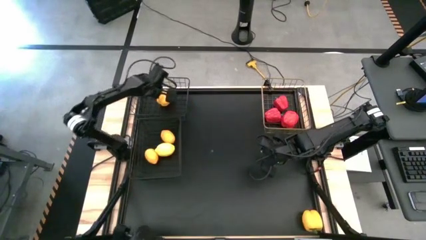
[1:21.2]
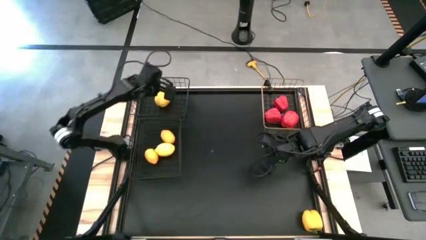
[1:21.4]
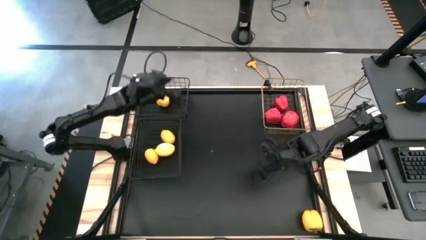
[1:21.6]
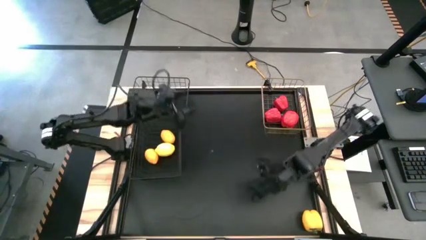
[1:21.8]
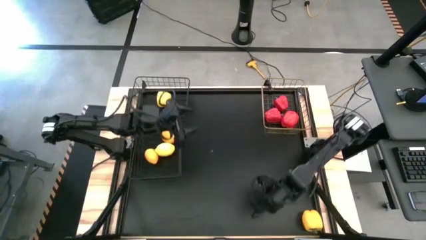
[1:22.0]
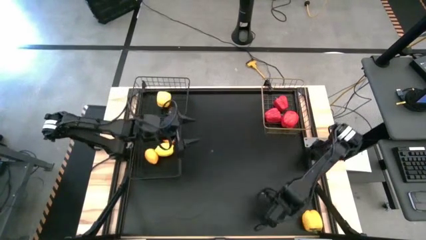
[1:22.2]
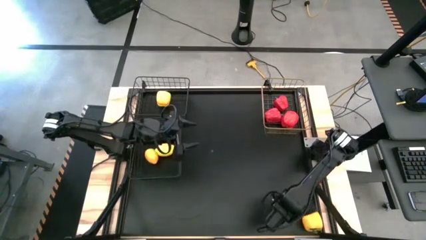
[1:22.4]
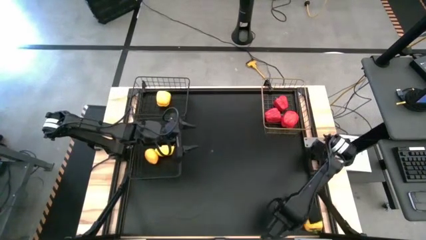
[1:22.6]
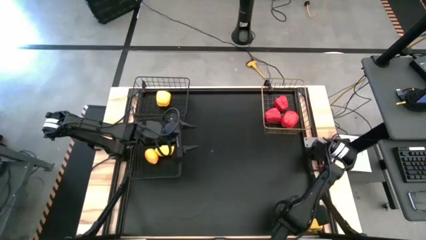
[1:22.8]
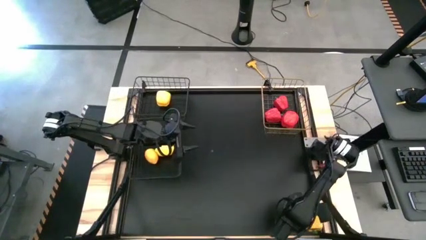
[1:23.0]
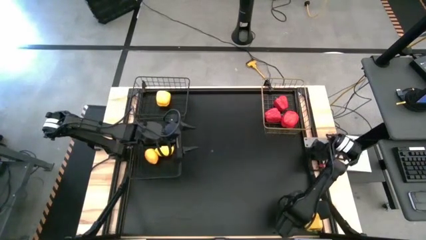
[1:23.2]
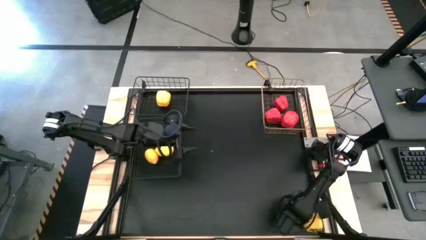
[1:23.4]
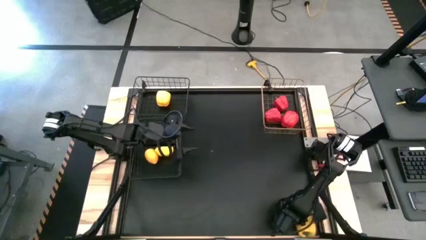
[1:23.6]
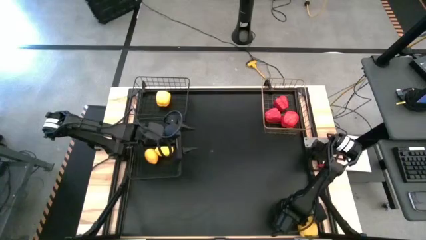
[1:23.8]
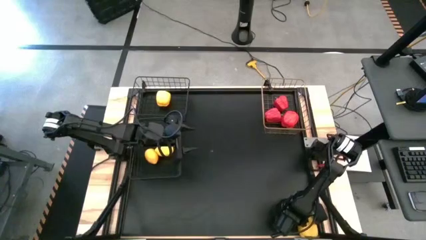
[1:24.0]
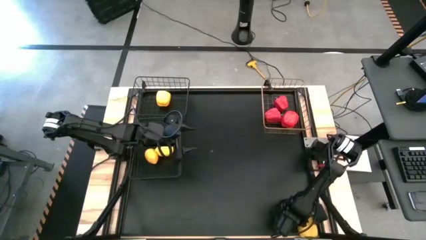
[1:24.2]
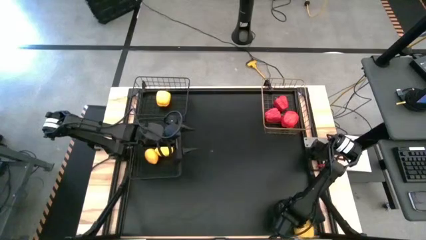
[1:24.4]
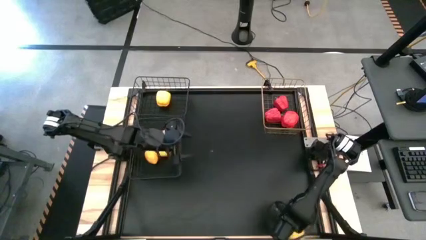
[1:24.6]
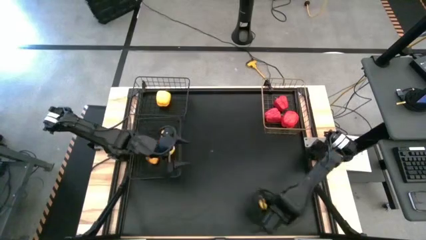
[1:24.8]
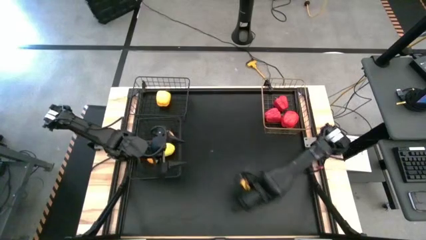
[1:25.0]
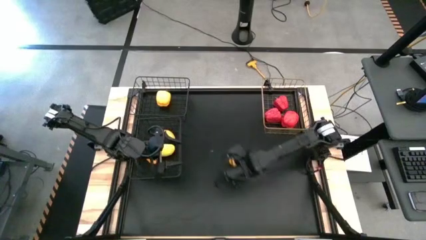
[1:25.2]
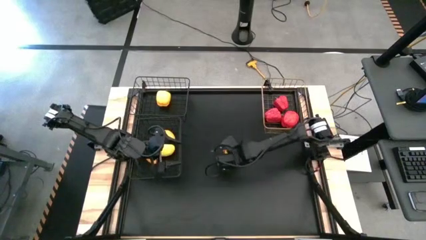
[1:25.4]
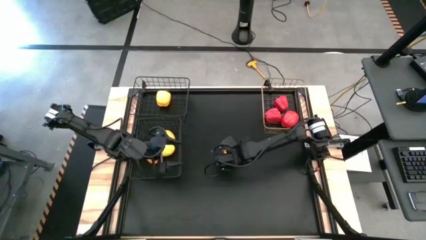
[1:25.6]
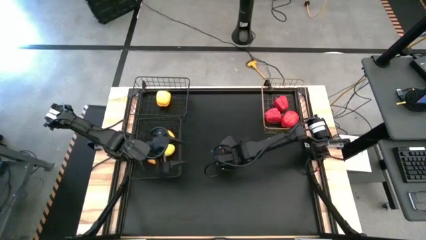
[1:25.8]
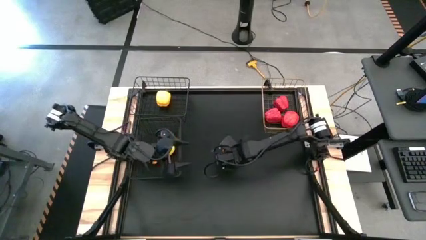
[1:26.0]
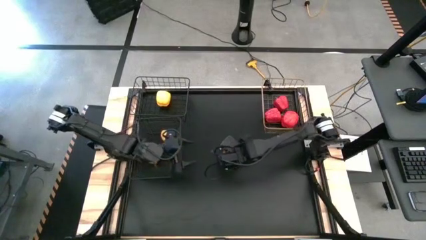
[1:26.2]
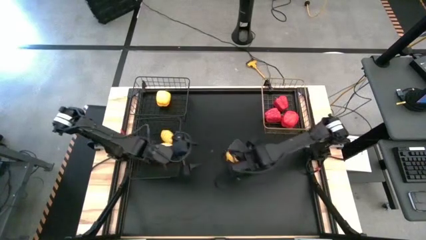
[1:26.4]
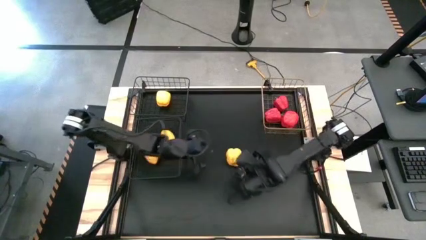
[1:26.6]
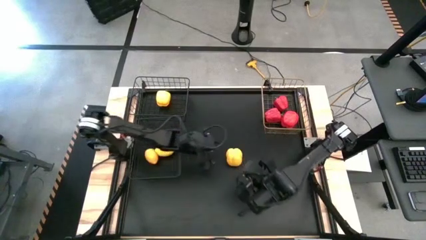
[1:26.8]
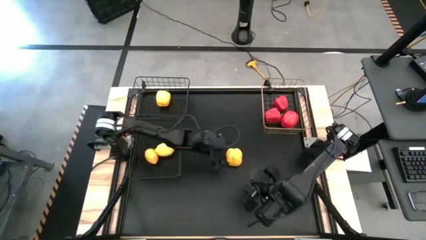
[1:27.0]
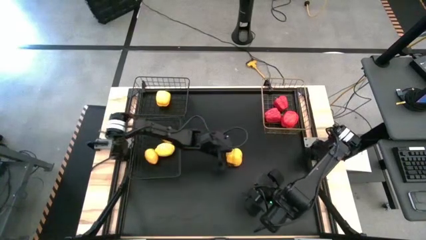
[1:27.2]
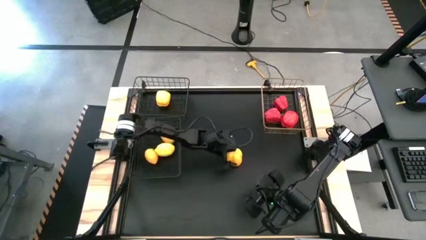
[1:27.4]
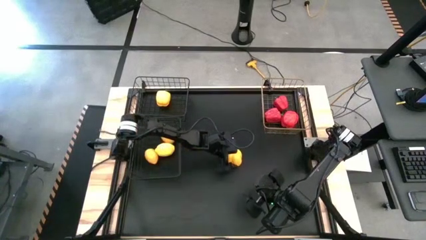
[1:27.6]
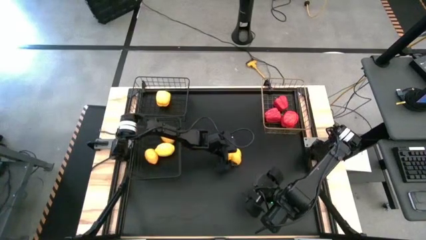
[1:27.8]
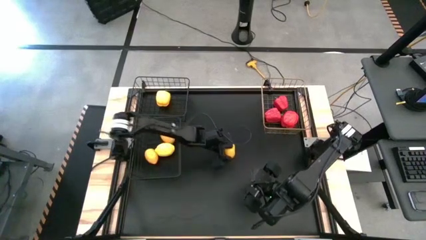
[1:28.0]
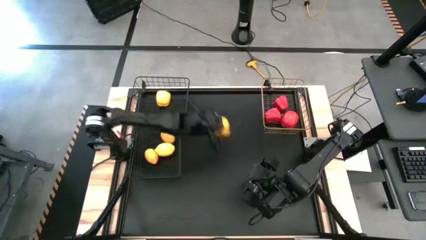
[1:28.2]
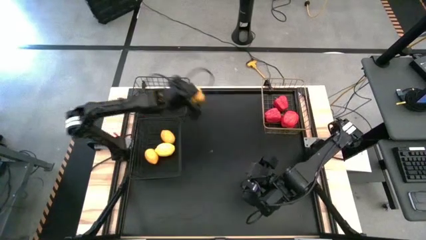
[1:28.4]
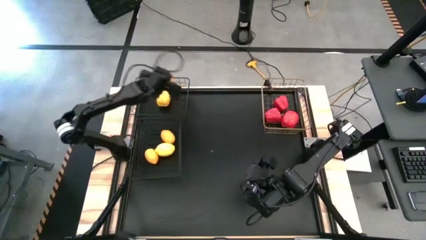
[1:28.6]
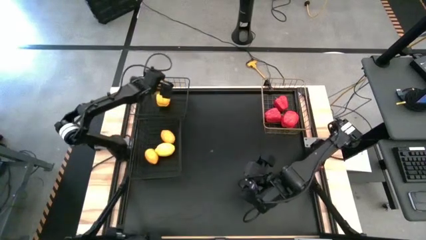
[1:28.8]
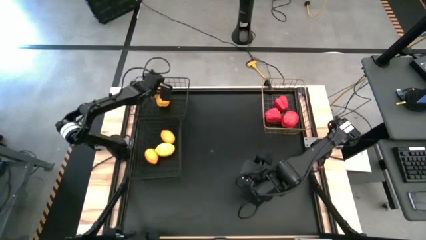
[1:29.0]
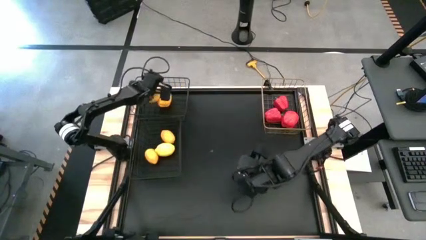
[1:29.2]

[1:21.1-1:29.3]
Task: Sort produce into baskets
Put the yellow bell pepper into the top black wire basket

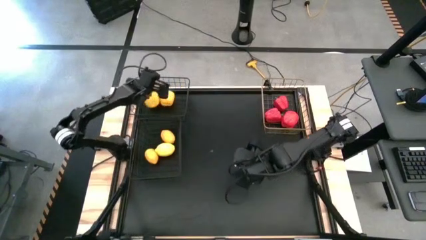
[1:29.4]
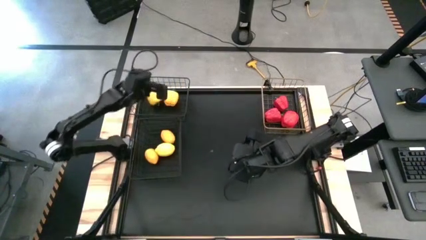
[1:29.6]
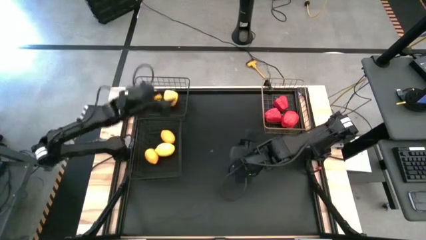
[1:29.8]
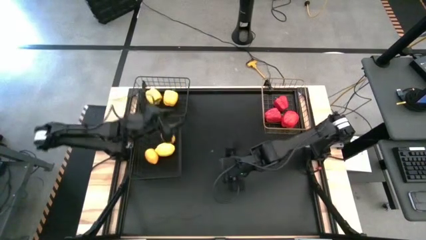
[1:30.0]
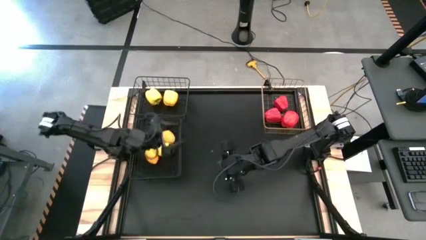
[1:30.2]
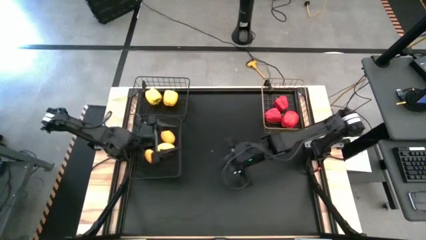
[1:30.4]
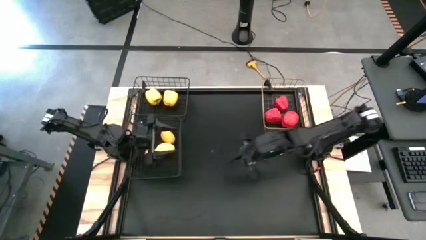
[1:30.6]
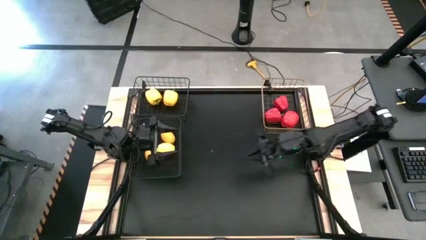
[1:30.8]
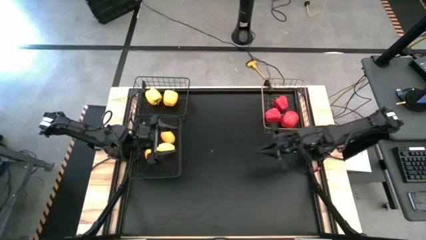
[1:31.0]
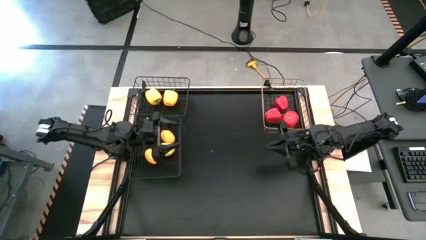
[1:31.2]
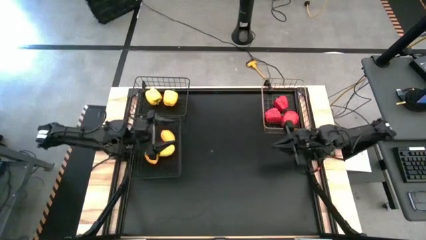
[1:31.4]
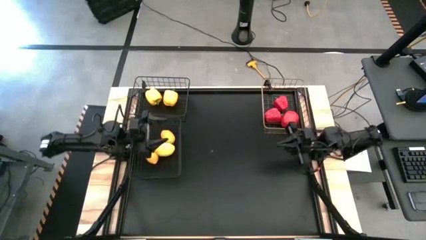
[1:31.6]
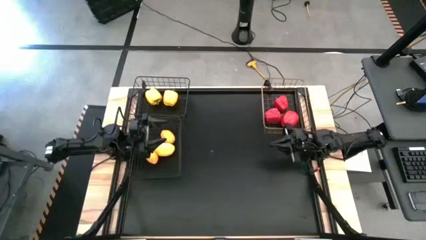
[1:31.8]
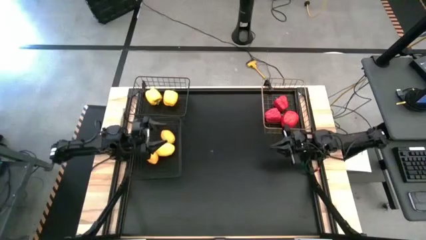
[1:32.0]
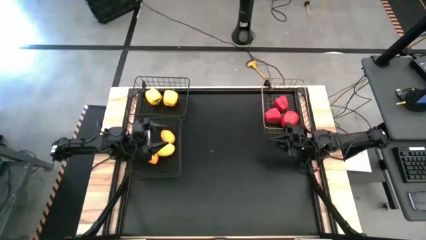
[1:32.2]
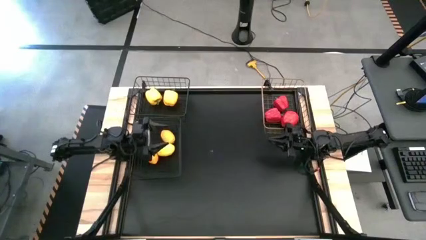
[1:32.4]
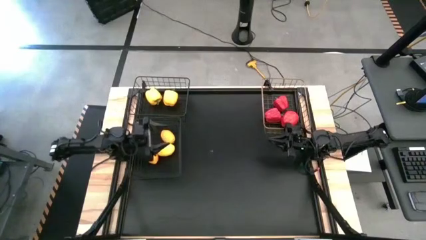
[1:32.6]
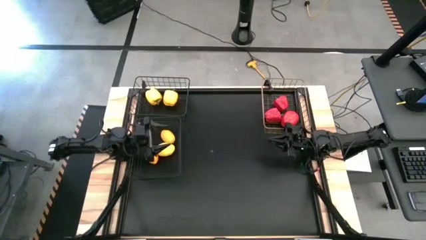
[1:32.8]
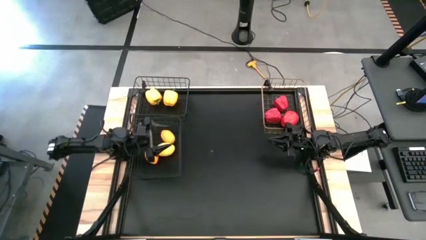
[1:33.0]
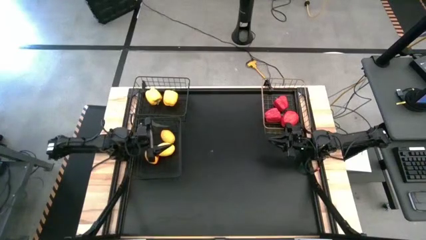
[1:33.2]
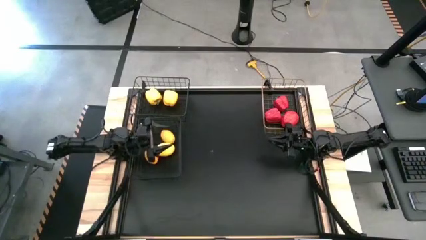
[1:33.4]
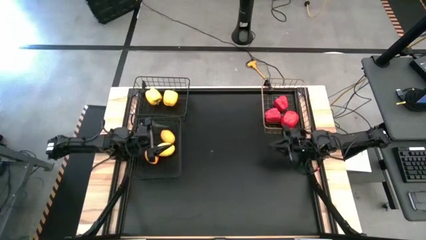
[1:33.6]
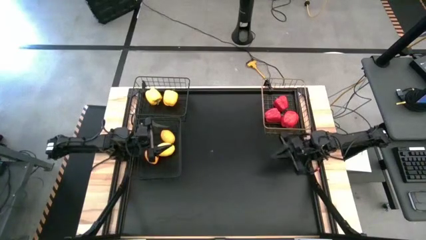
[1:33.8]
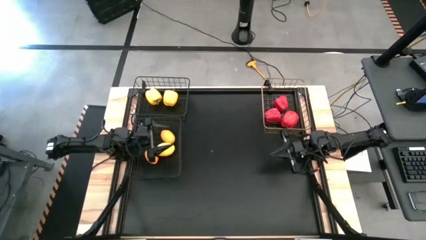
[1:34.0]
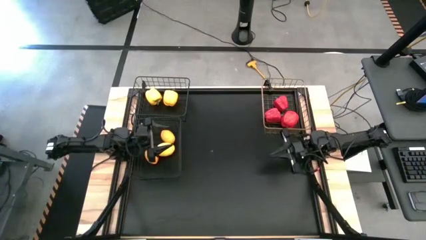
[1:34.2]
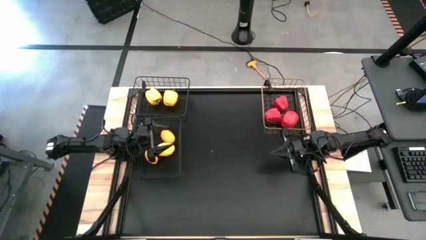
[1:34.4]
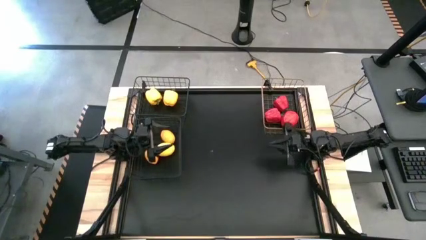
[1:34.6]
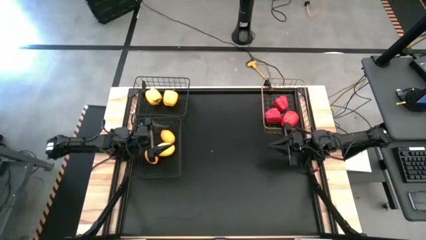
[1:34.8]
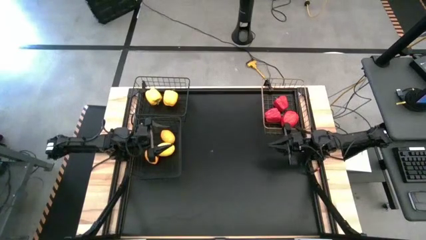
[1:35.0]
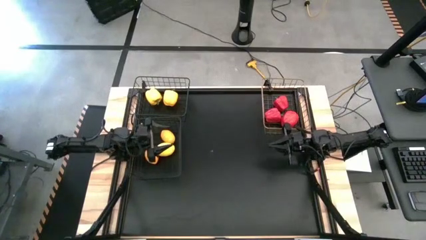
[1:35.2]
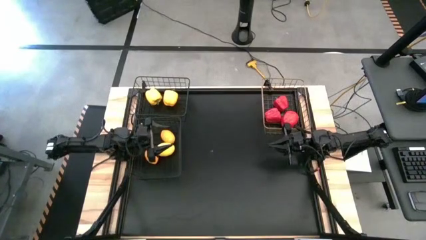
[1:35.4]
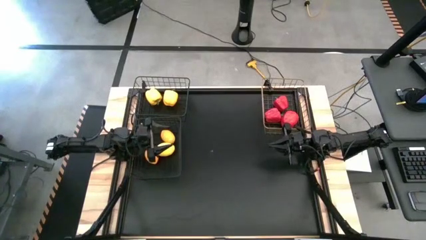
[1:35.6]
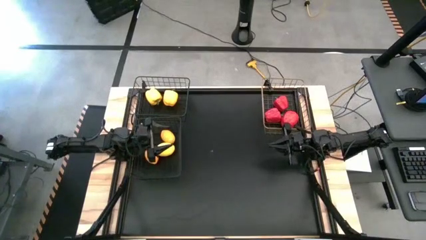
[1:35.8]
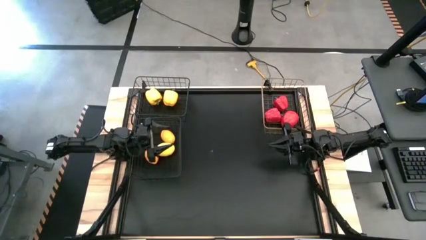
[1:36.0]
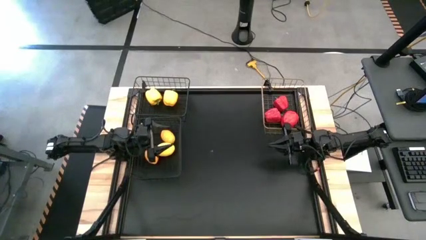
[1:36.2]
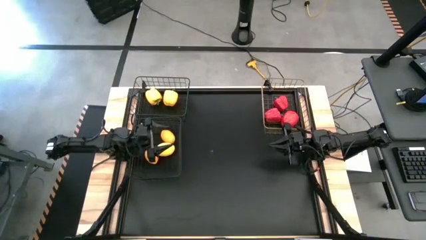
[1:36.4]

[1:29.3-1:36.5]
Return to Home Position

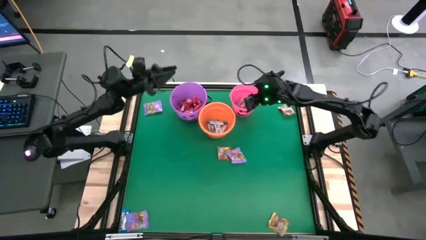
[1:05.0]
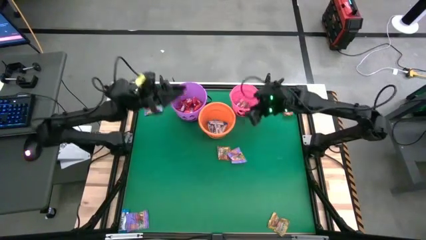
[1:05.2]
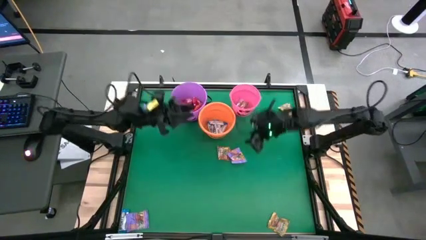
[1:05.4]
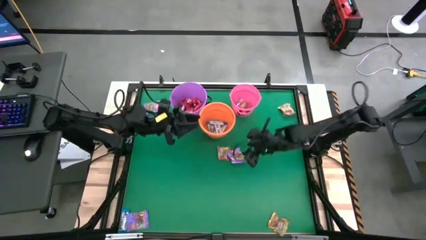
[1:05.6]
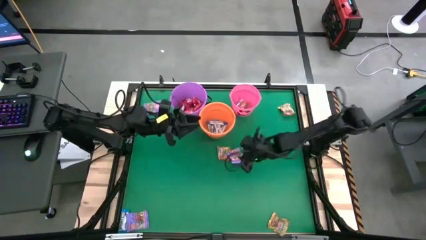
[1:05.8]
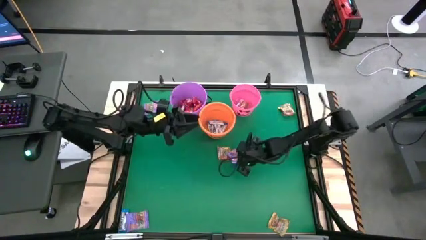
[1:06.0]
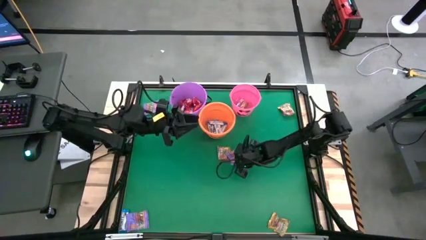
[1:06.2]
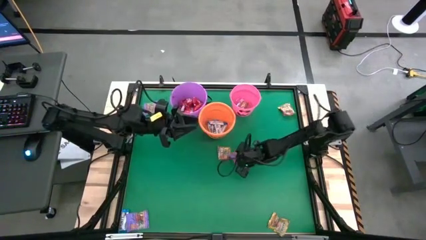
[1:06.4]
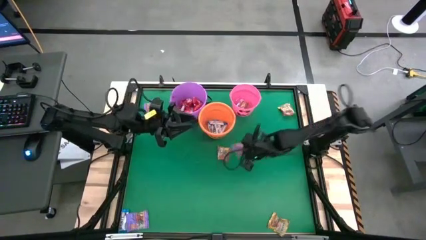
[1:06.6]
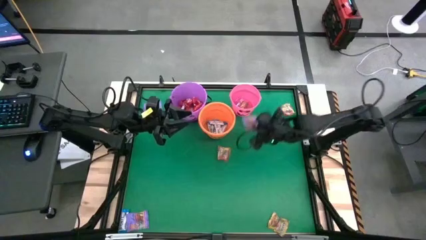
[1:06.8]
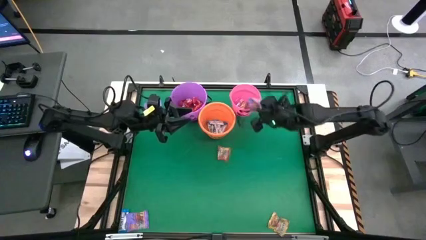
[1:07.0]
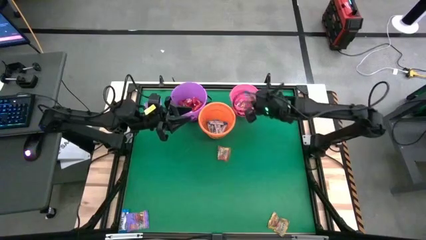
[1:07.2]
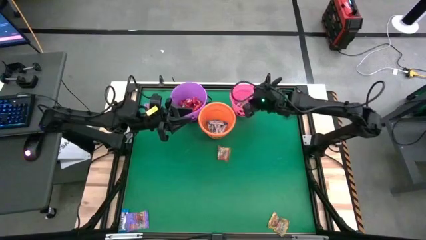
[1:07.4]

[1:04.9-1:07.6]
Task: Sort candy by brand, put in halloween buckets
Put the violet gummy candy into the pink bucket
